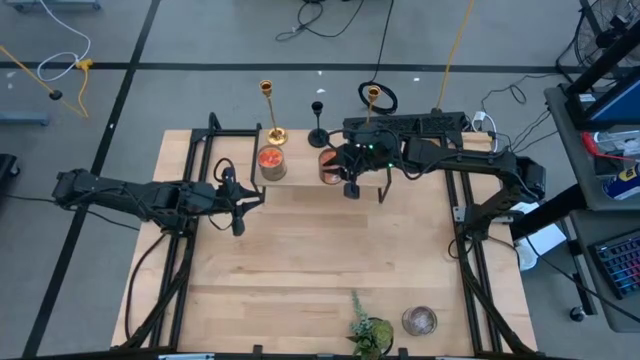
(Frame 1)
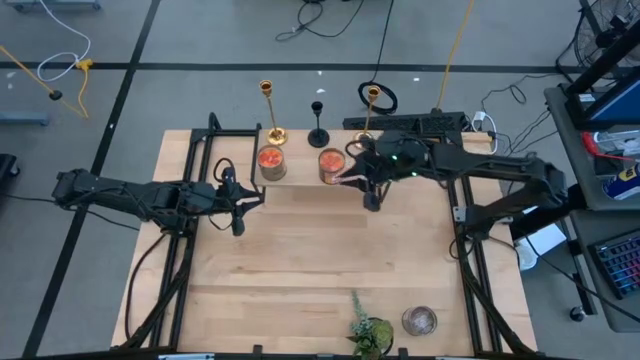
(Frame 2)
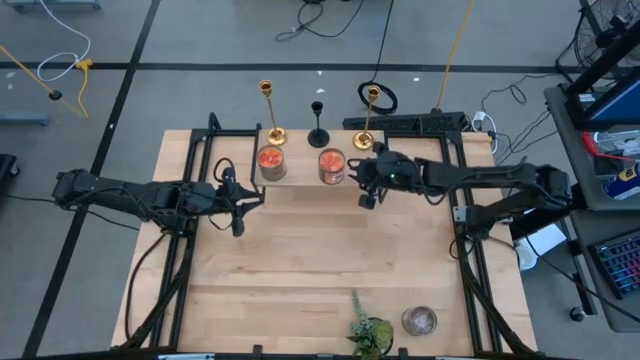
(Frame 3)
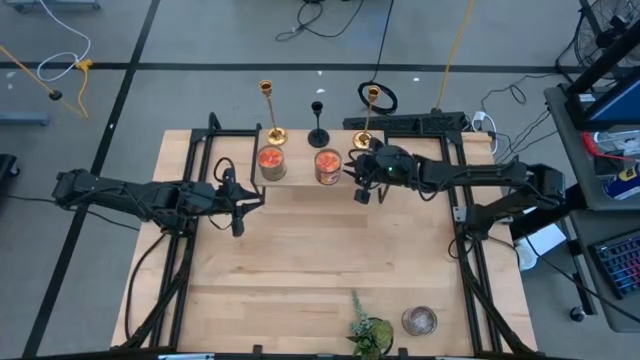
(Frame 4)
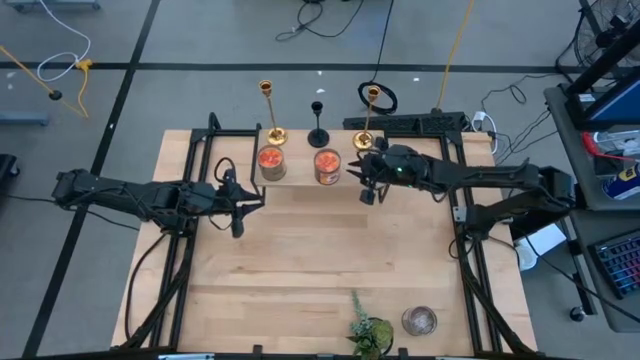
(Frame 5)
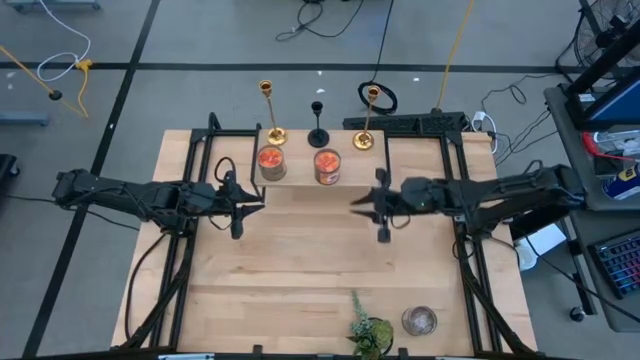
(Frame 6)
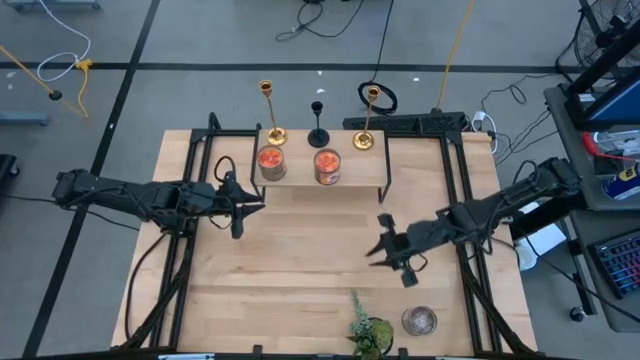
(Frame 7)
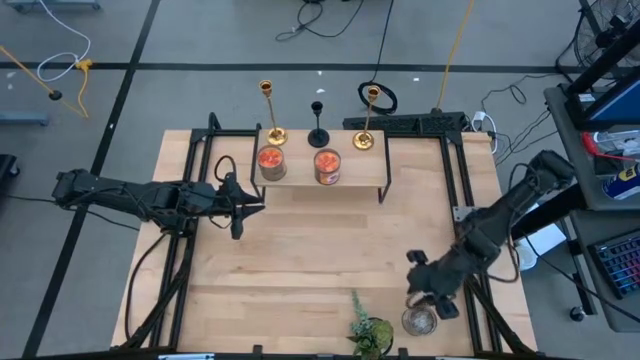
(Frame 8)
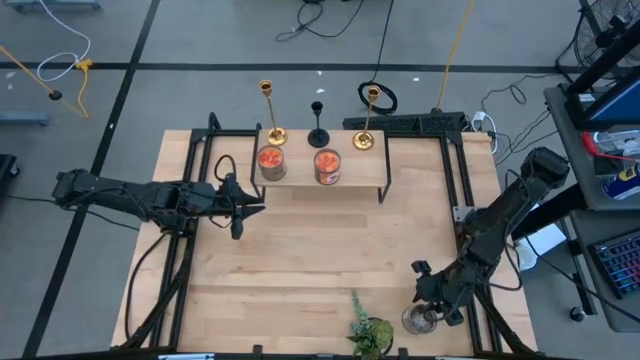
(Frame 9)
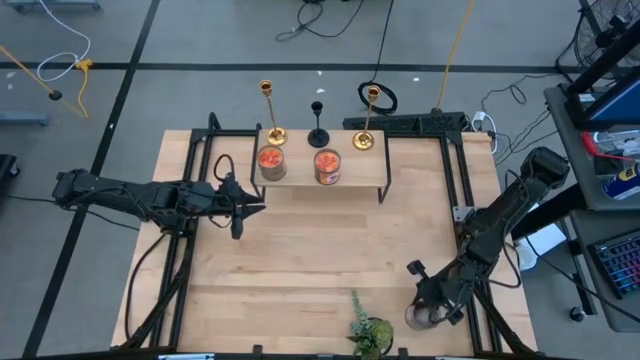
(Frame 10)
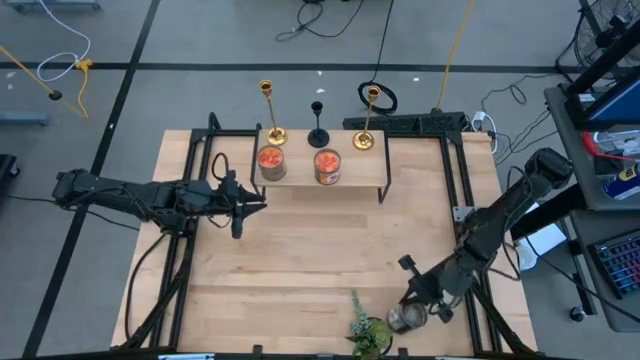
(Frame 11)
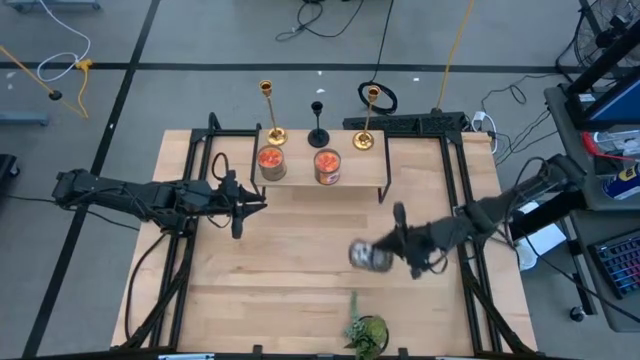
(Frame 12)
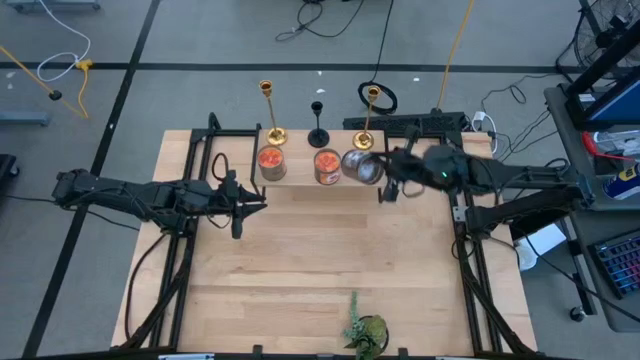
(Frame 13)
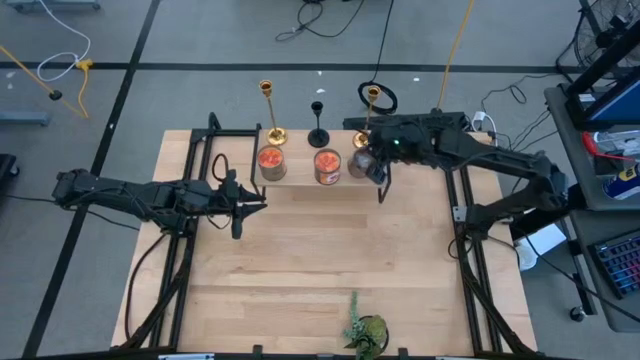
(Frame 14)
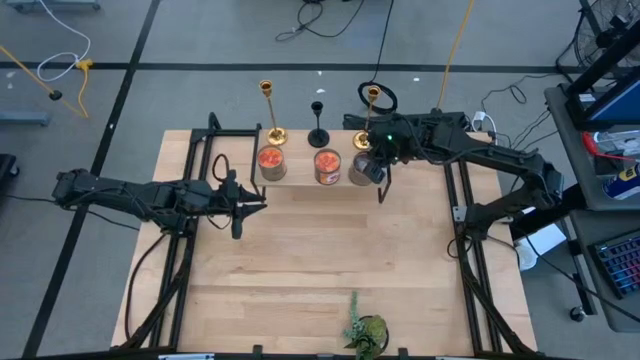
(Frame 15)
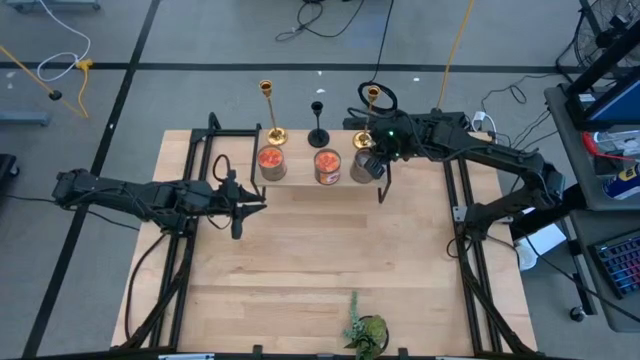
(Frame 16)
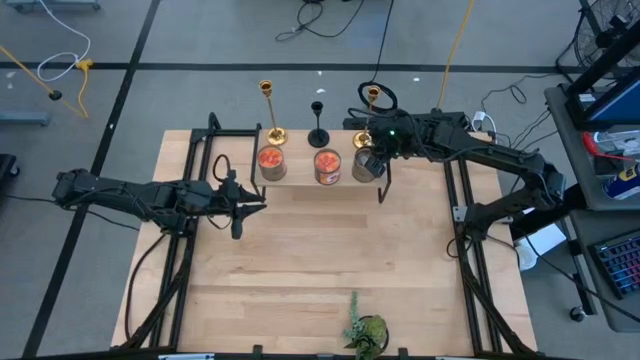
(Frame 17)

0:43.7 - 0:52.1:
Task: Pick & Place candle stick holders
Put the brown scented candle on the shelf aligned with the other orange scented candles

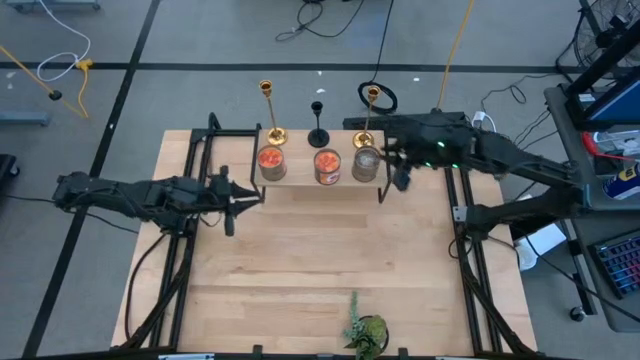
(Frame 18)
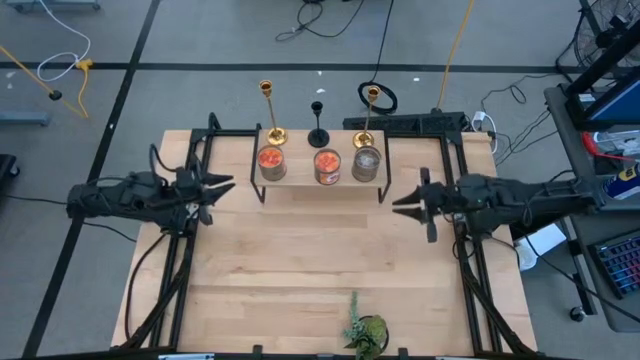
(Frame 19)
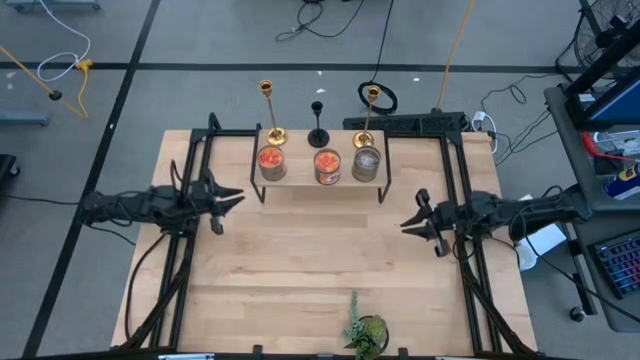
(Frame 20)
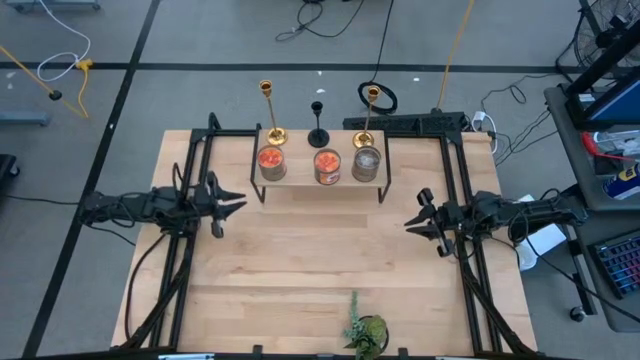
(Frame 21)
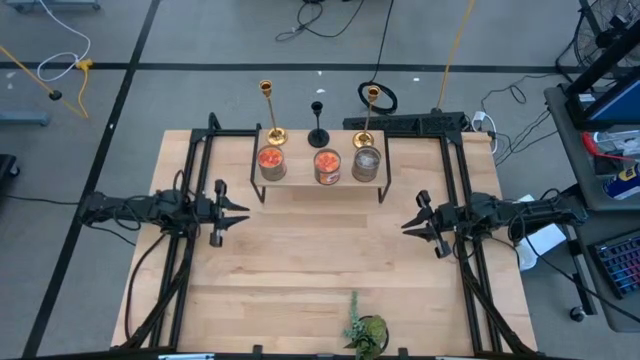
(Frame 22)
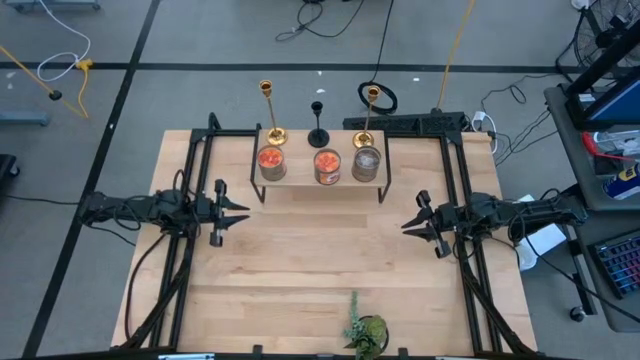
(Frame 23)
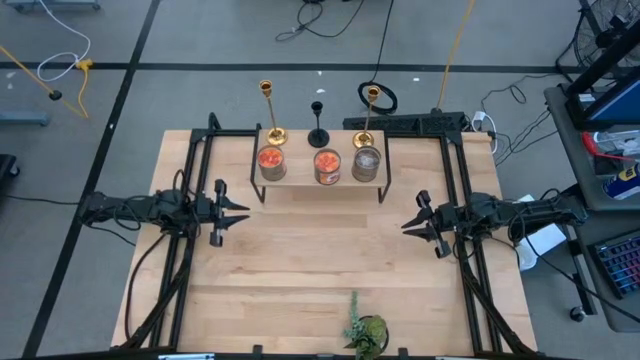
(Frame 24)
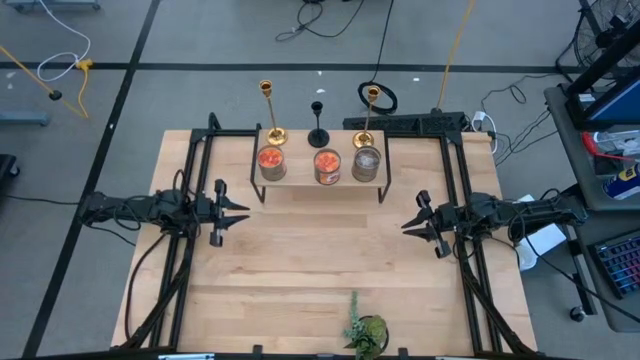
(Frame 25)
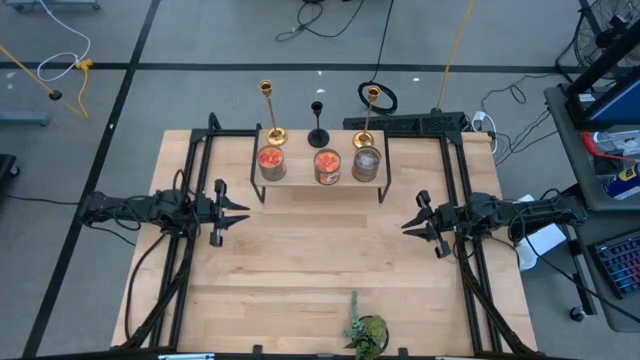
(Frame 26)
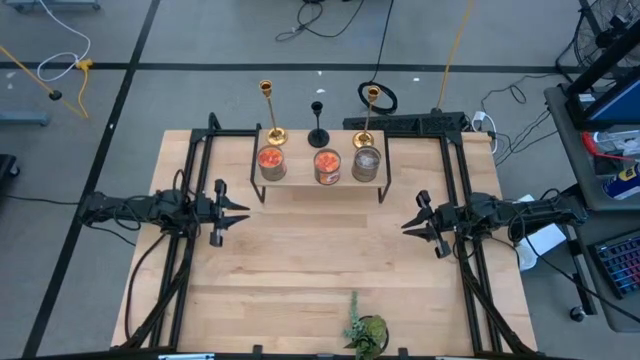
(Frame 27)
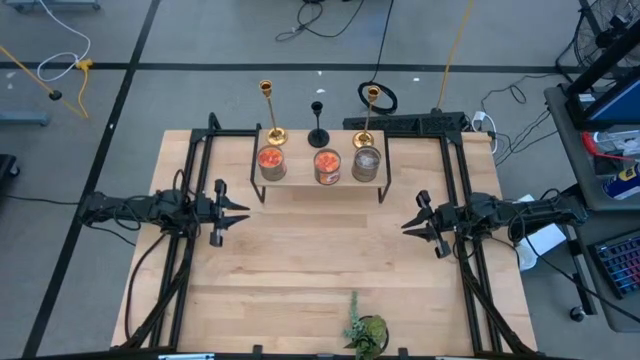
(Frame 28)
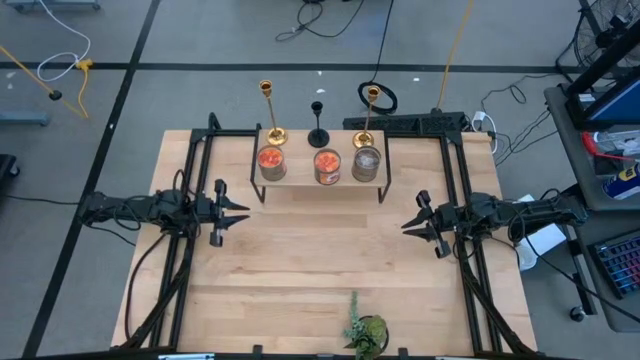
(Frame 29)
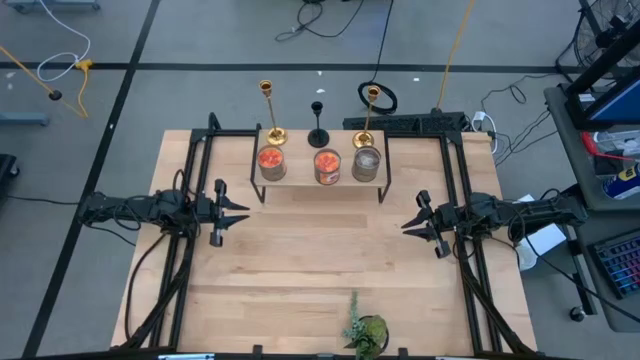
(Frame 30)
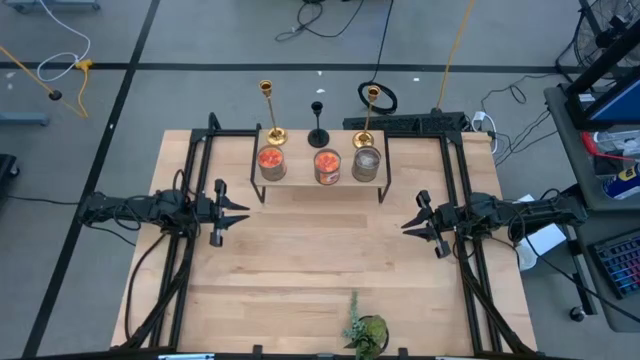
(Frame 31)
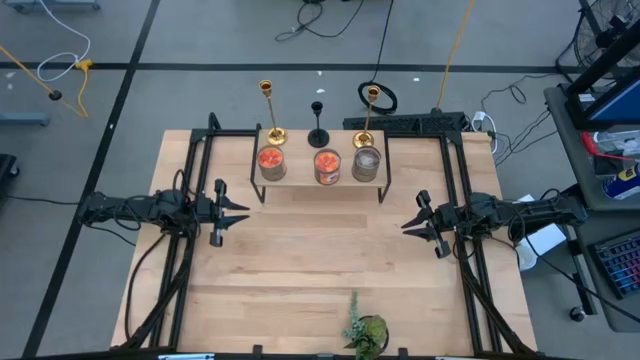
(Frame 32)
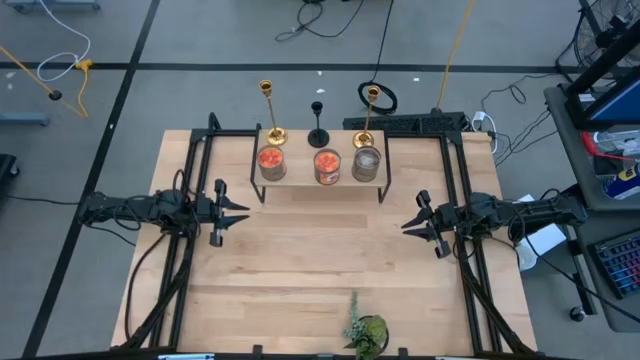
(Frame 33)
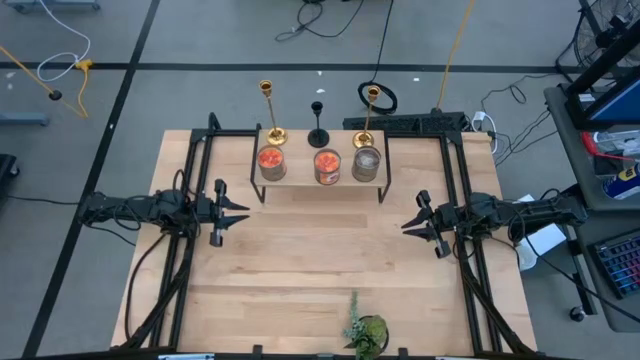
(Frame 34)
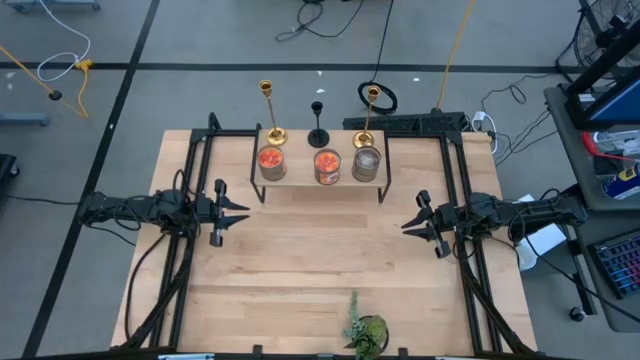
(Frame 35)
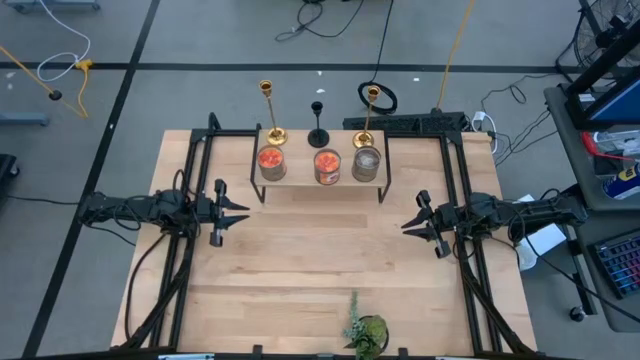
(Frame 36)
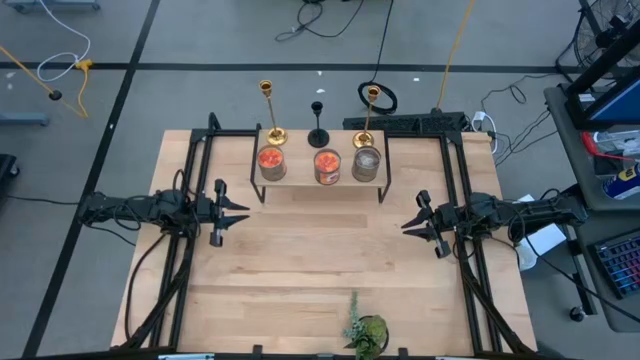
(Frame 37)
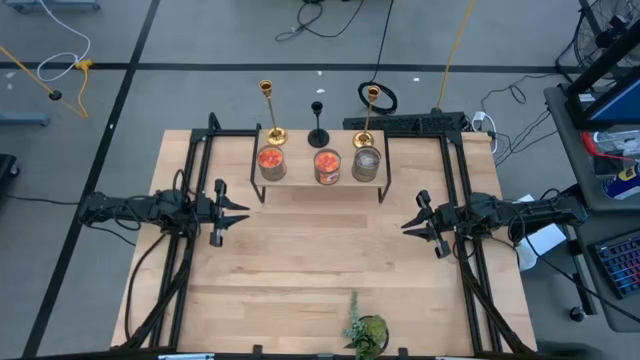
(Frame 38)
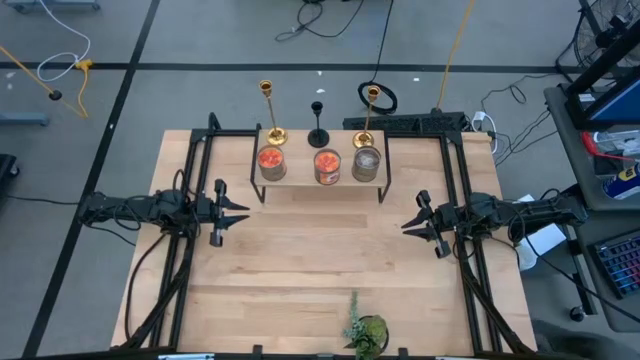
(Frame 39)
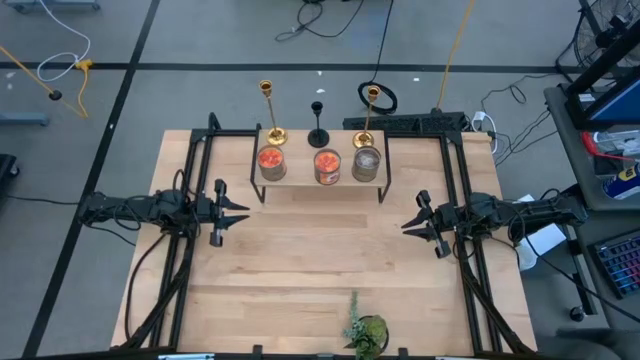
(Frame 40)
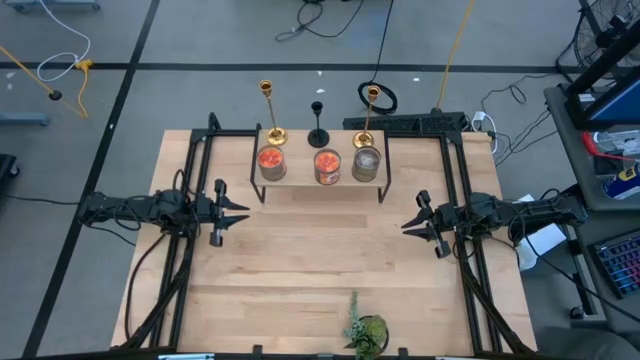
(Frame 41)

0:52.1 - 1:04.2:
Return to Home Position
